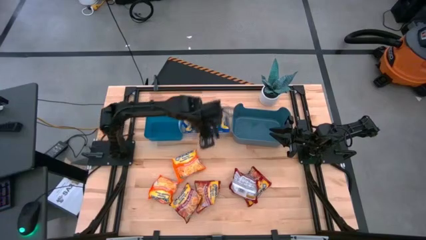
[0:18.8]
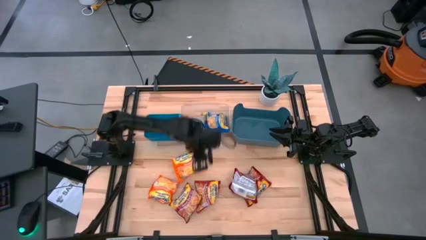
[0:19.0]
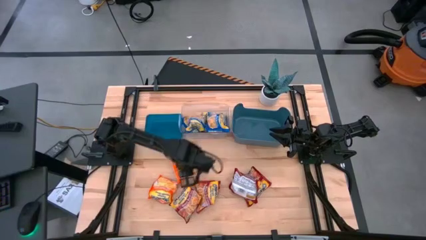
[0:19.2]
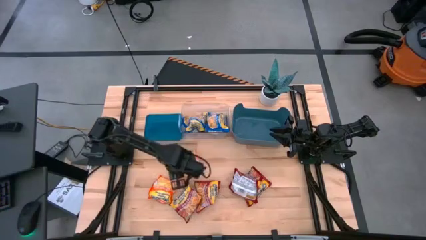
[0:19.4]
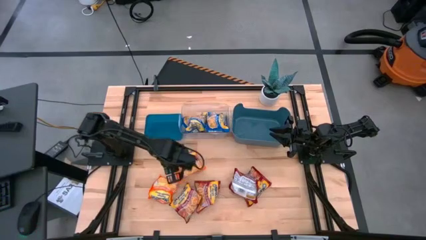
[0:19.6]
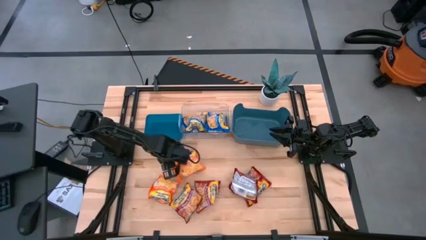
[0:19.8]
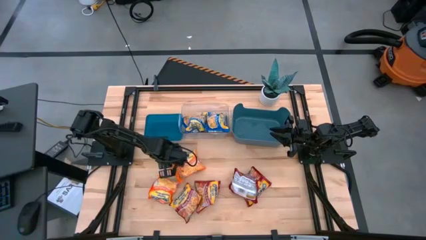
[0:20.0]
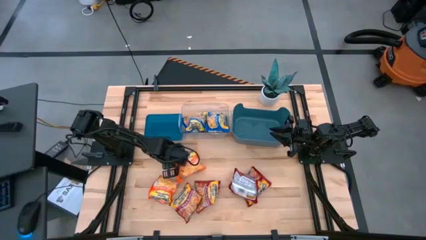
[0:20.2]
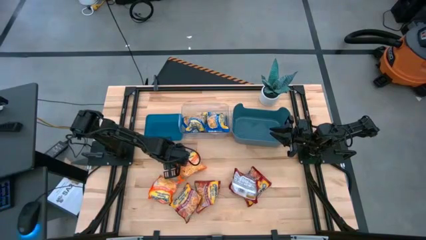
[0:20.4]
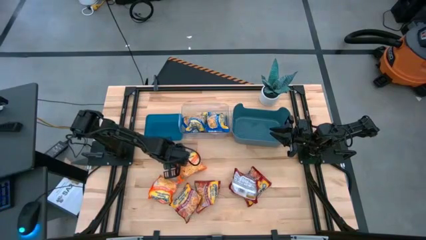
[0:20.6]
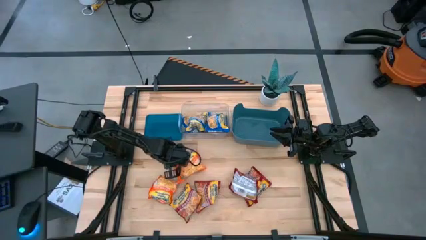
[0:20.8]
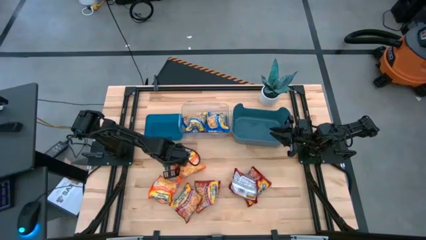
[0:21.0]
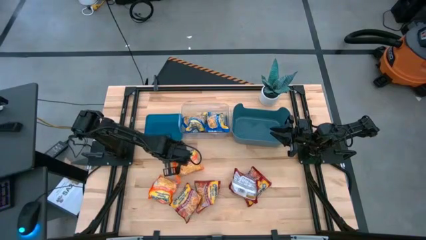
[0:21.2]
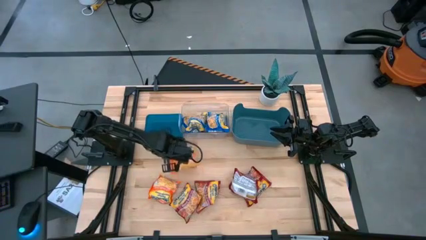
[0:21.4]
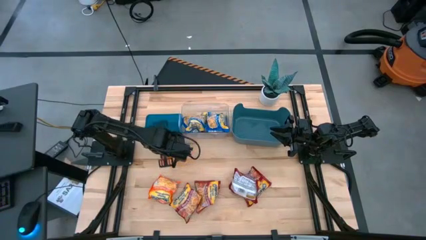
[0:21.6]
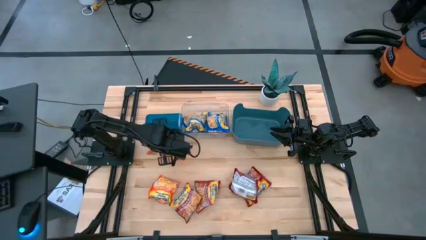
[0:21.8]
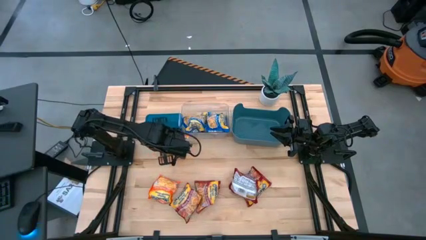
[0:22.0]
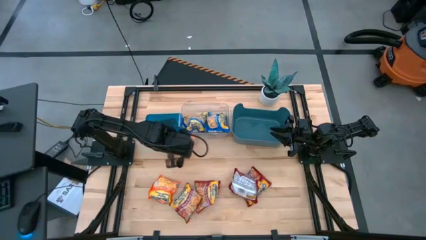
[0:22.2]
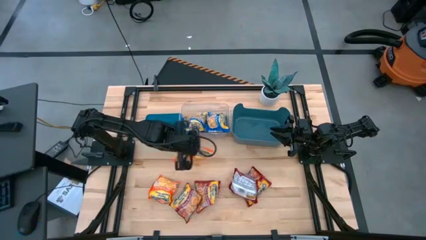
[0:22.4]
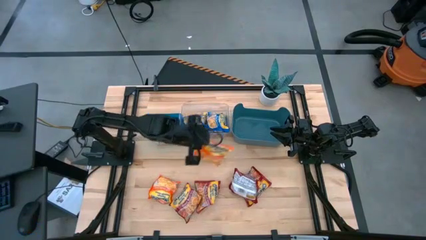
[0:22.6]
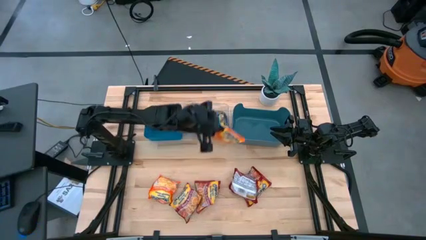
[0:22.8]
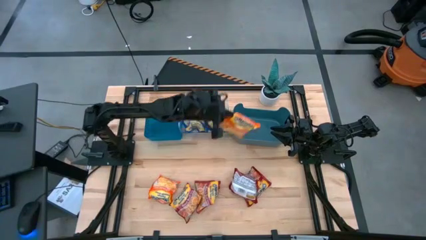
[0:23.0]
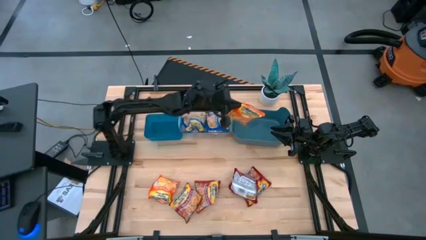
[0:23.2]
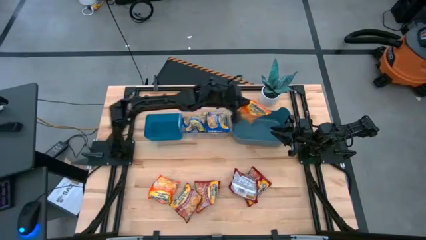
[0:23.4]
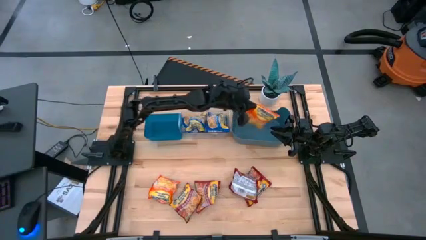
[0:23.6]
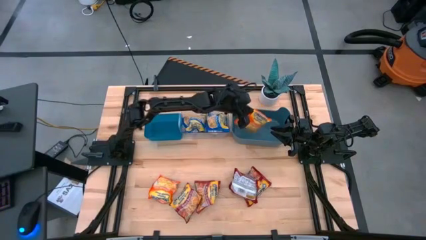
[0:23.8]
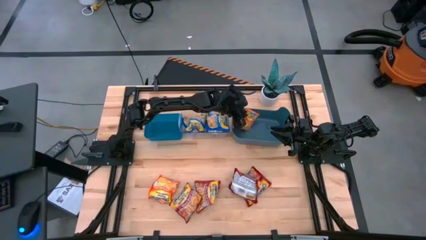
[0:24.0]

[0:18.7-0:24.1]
Task: Sort Maruchan noodles
Put the top orange noodle pack into the right blue bin

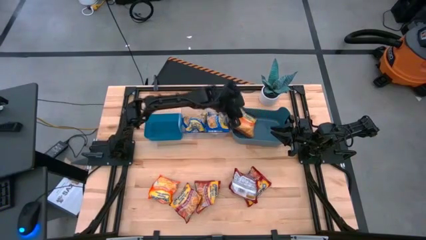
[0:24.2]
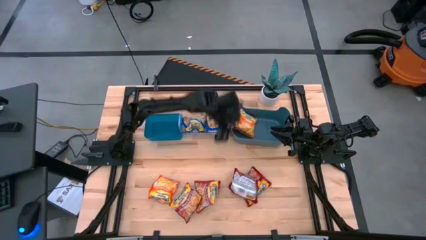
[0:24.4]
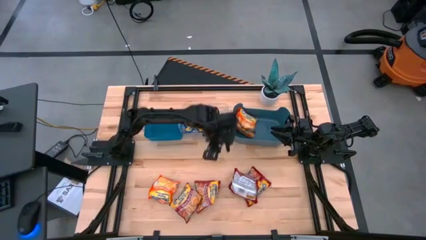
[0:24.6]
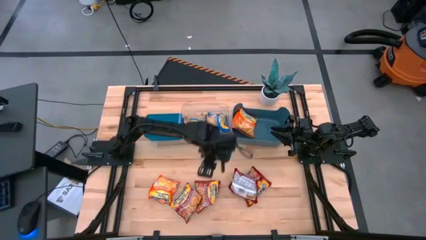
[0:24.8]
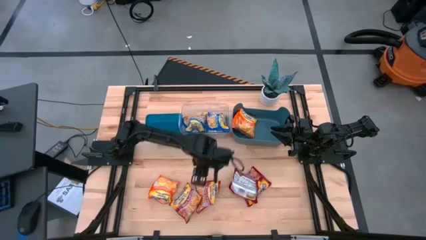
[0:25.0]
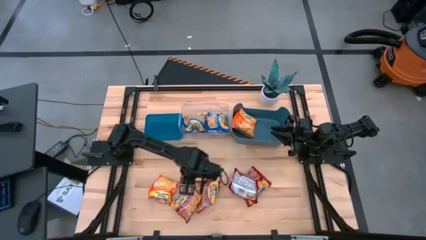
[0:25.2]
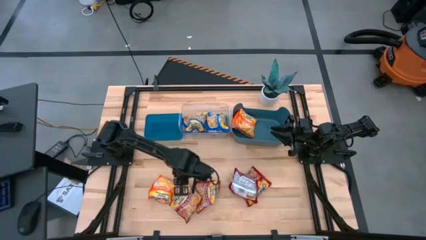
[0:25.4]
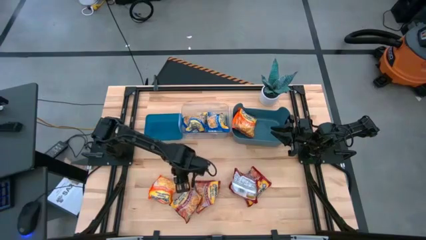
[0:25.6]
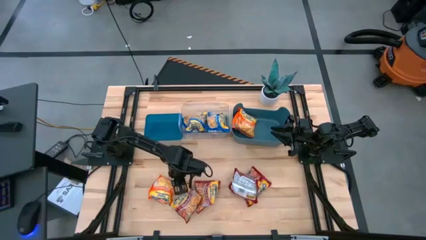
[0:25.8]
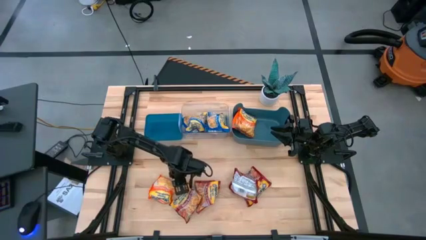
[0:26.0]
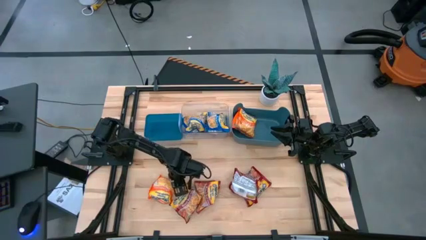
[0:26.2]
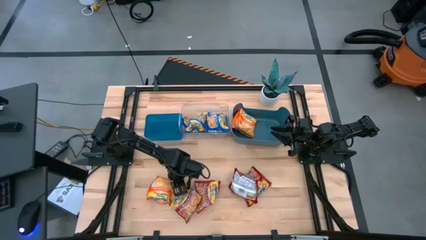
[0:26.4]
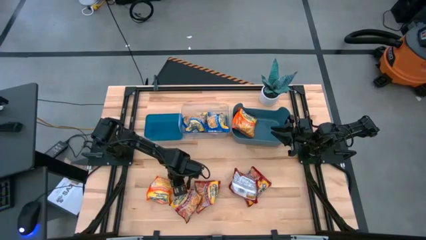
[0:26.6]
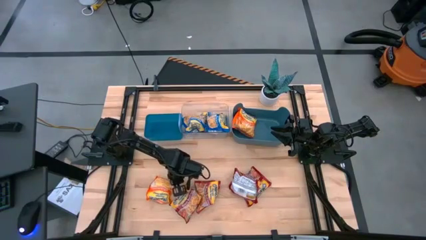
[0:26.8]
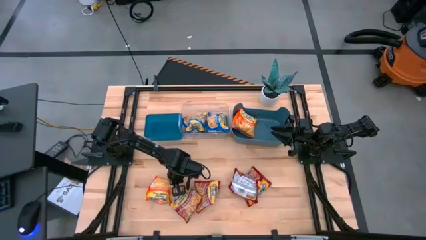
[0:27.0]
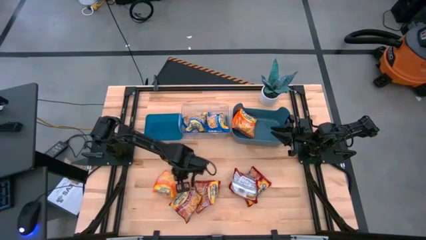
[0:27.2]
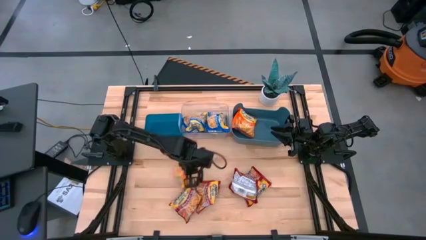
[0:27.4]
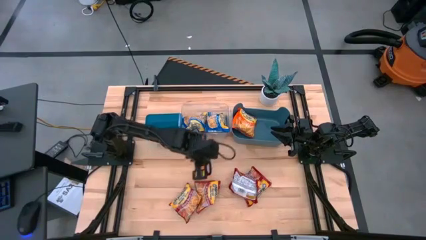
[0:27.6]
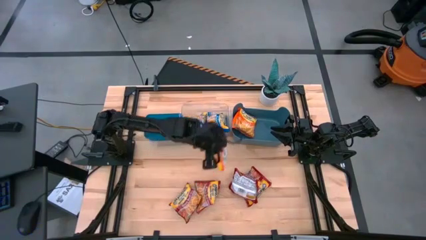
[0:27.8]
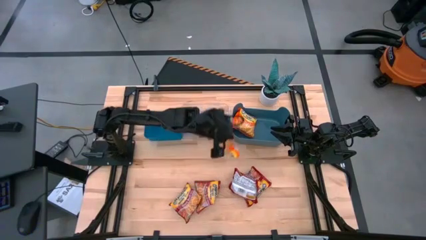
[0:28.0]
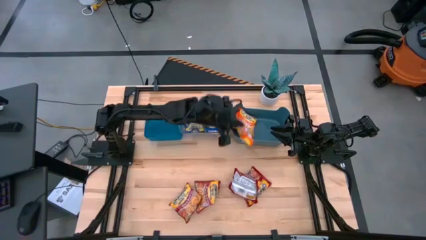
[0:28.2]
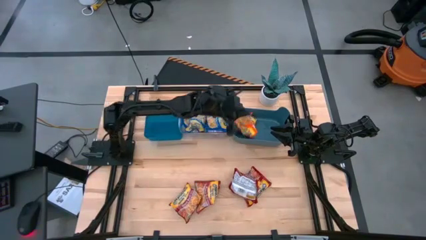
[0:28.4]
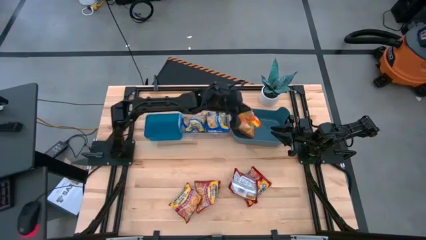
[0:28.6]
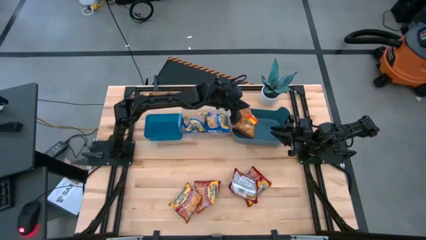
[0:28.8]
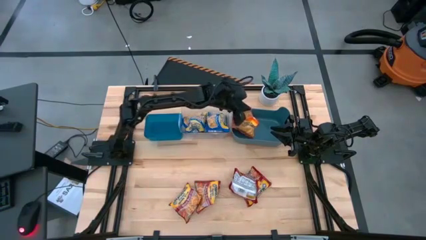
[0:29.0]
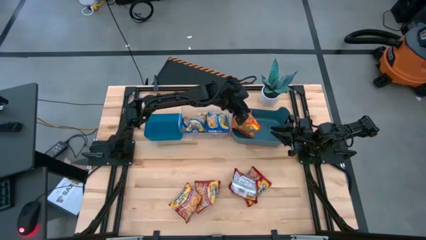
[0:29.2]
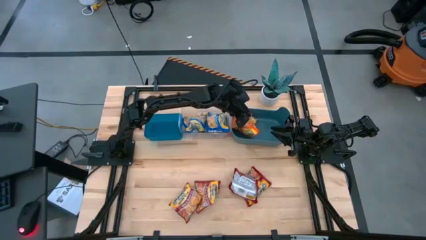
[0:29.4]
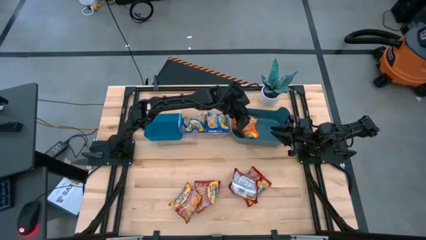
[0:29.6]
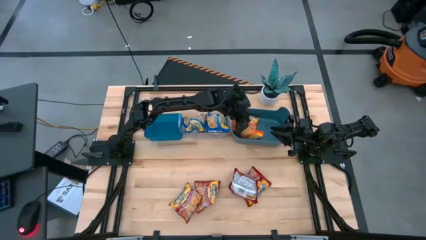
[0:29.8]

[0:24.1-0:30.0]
Put the orange noodle pack into the right blue bin

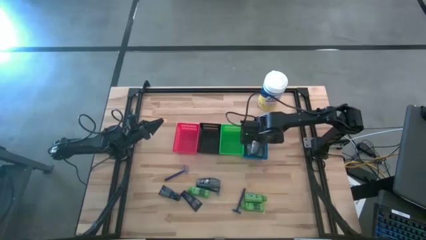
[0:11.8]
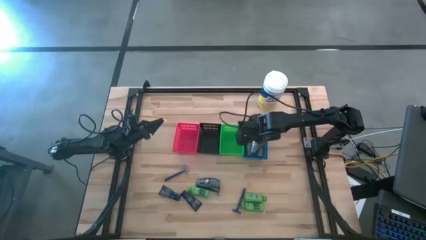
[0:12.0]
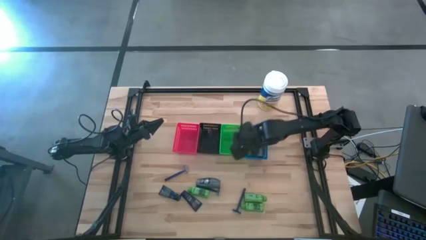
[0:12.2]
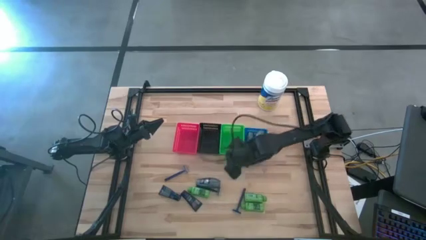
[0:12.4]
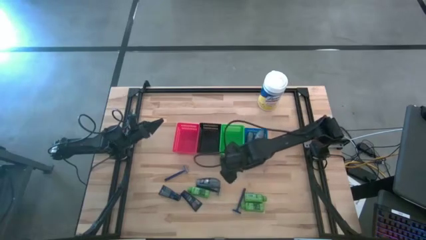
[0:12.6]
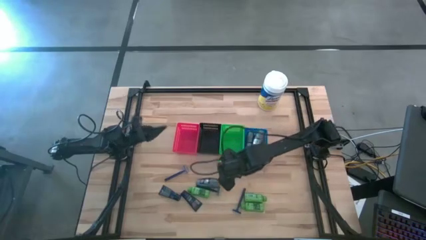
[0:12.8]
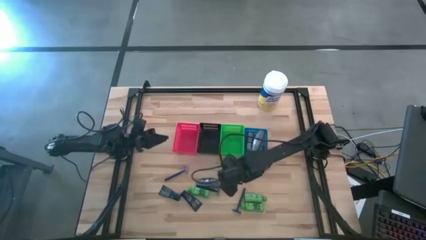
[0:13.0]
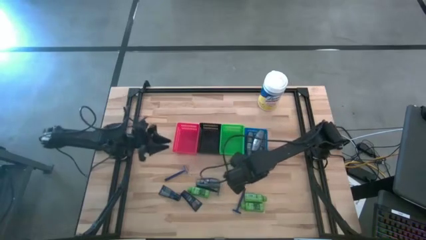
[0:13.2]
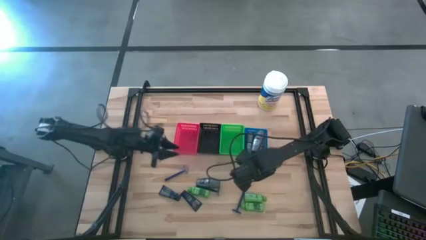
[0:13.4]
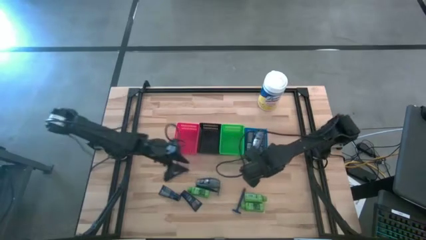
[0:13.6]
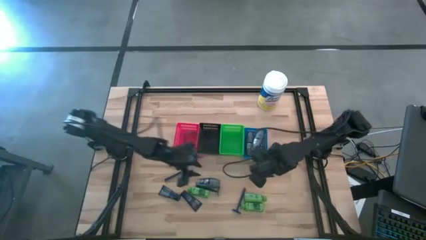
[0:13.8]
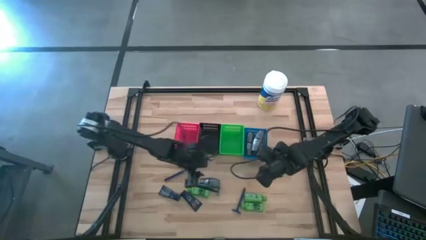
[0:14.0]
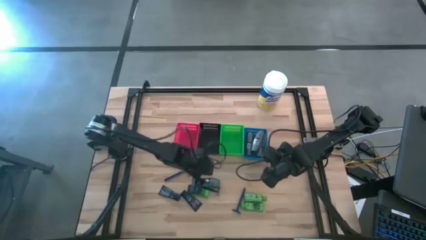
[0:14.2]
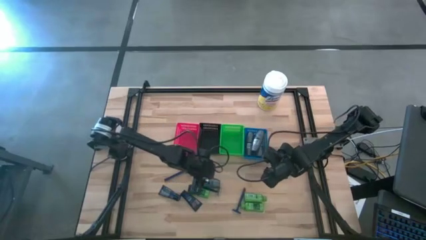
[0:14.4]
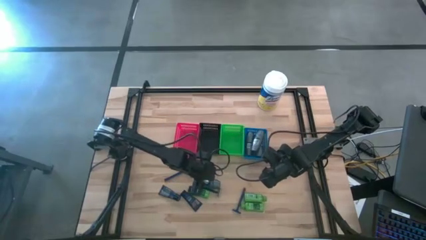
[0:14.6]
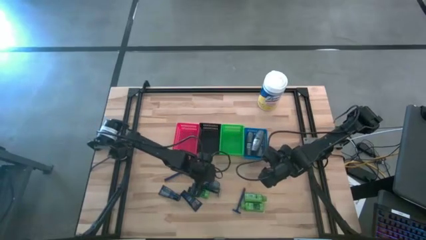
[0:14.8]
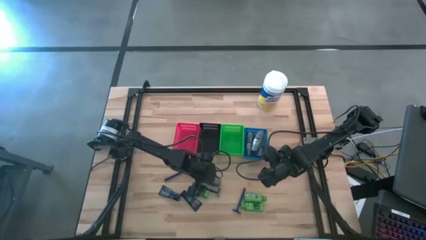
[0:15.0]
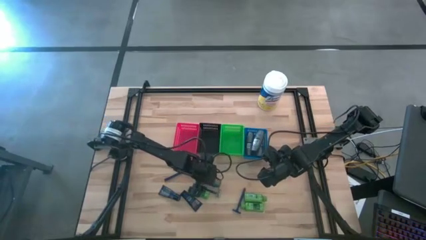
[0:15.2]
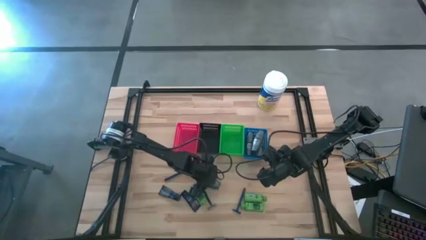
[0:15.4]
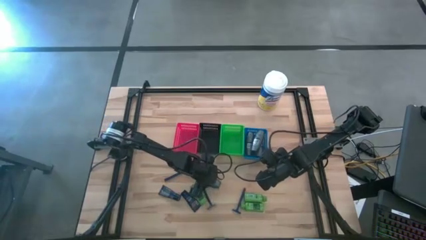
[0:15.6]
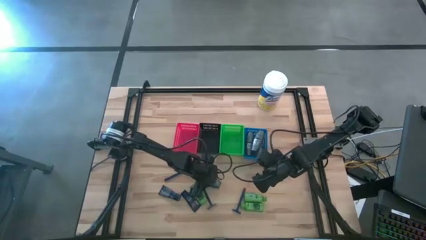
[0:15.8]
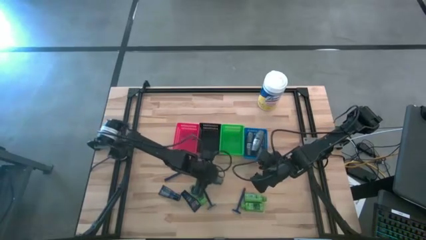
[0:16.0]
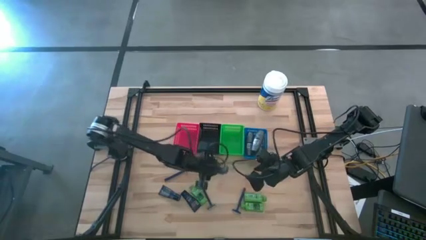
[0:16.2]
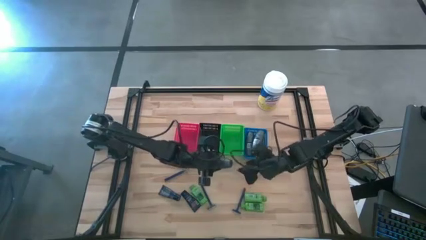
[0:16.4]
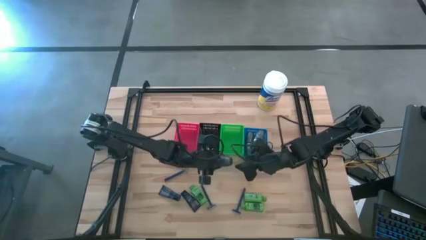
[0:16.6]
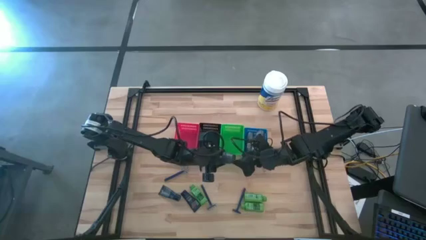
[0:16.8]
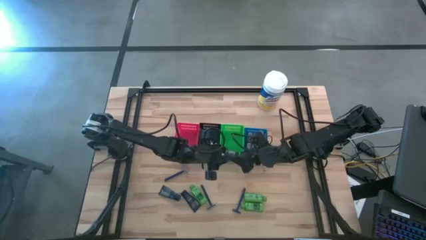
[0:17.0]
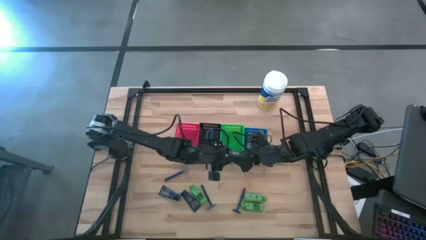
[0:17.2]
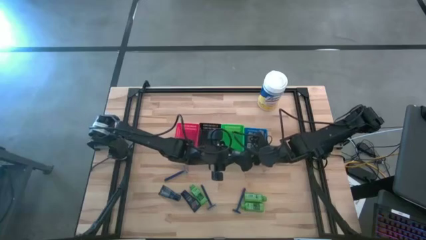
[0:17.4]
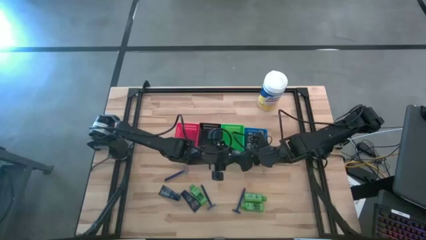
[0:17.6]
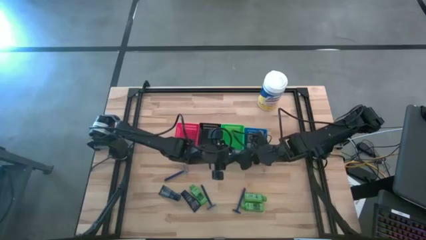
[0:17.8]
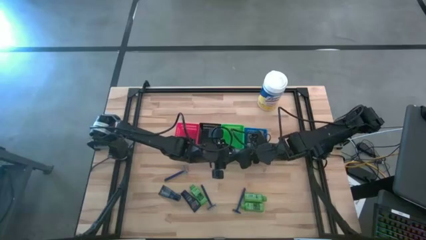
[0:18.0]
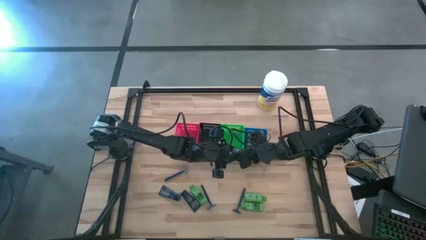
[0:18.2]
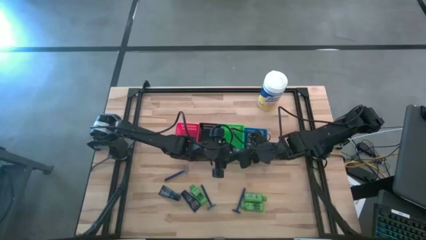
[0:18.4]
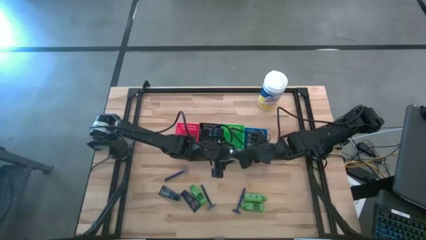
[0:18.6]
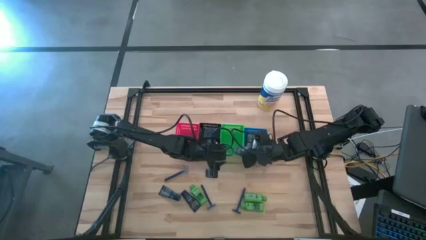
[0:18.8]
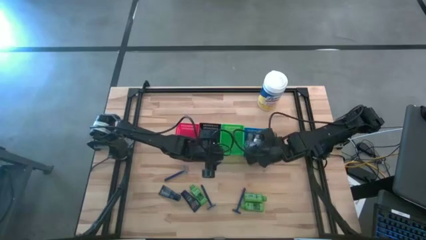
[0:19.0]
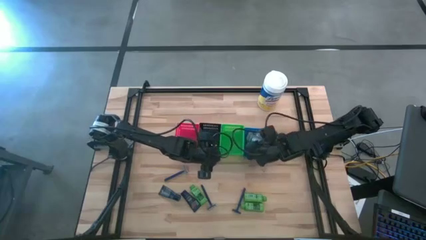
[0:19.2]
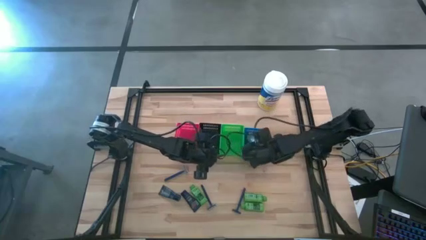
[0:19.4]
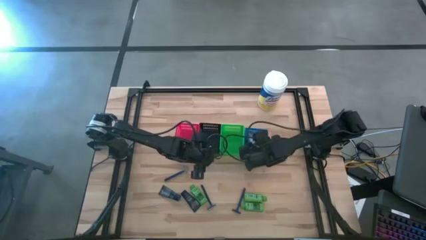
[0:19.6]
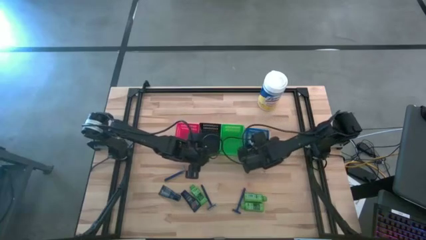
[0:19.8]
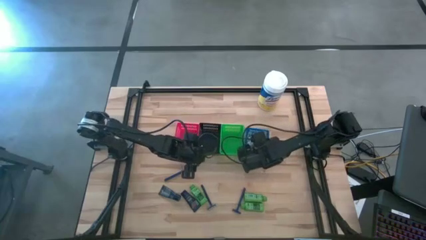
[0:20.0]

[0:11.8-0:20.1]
Task: Pick & Place Travel size toiletries
Put the gray deodorant into the blue bin
